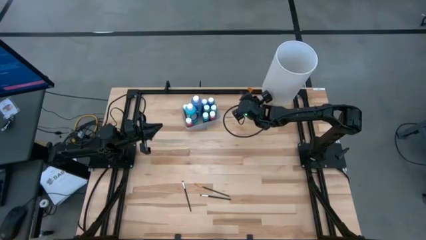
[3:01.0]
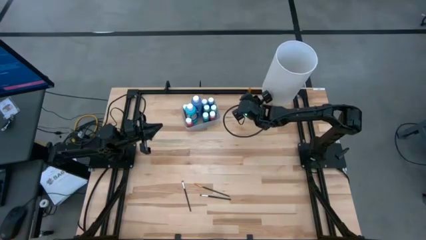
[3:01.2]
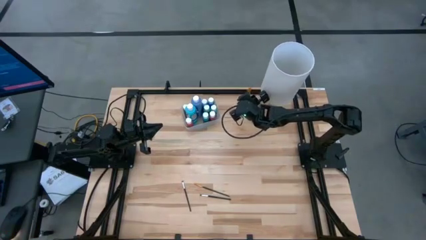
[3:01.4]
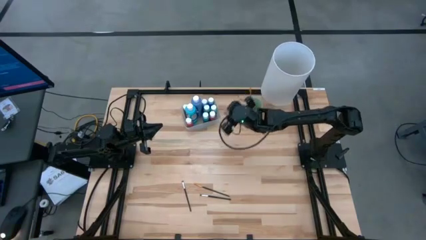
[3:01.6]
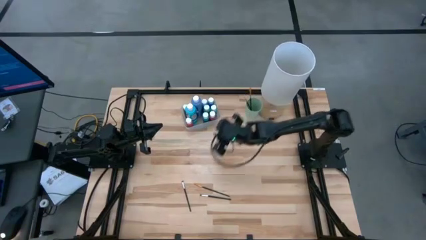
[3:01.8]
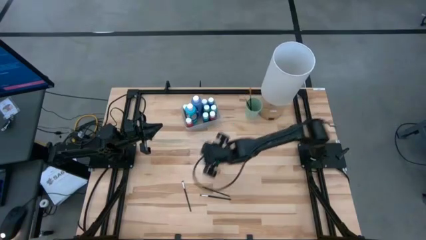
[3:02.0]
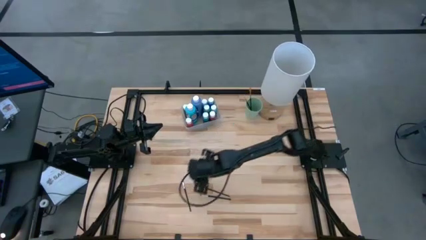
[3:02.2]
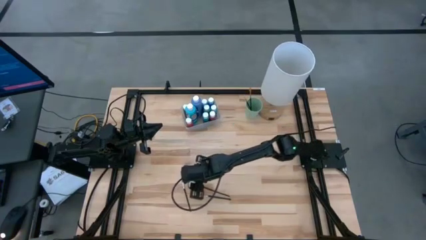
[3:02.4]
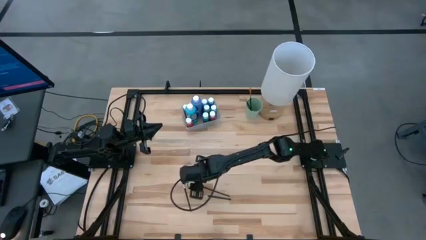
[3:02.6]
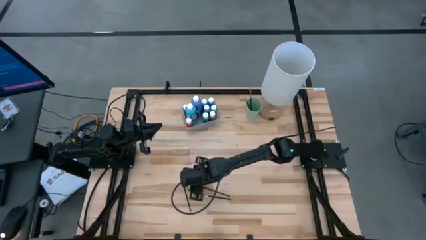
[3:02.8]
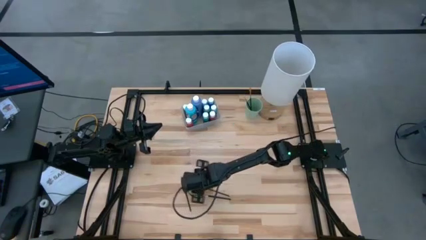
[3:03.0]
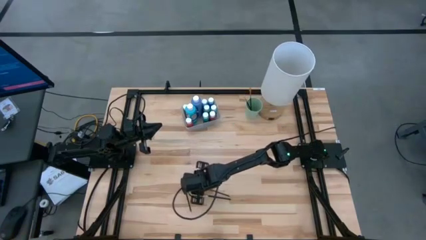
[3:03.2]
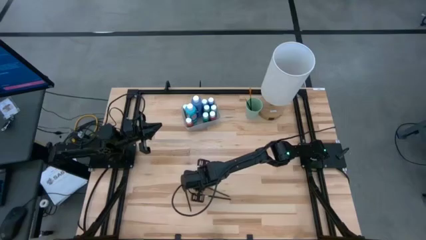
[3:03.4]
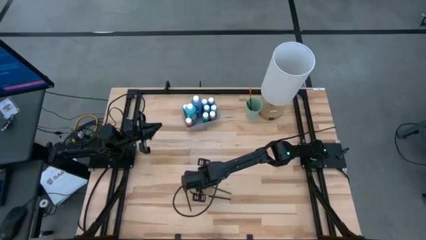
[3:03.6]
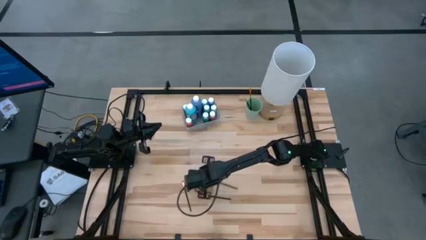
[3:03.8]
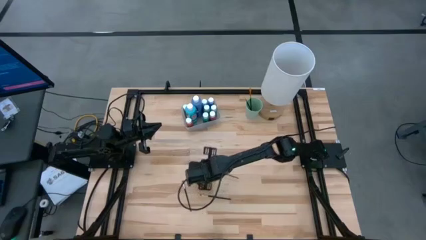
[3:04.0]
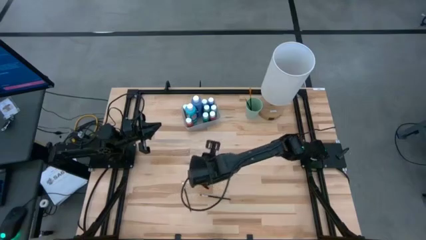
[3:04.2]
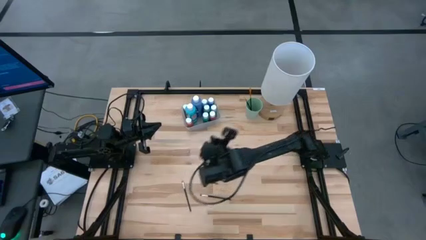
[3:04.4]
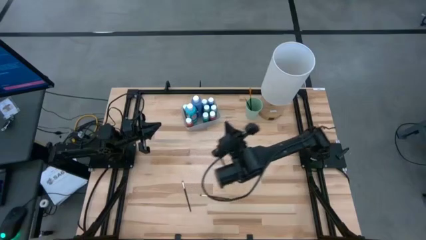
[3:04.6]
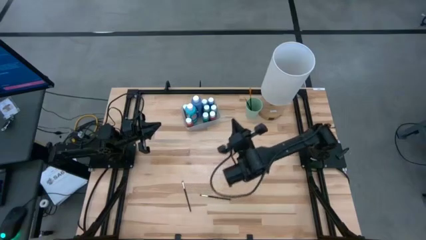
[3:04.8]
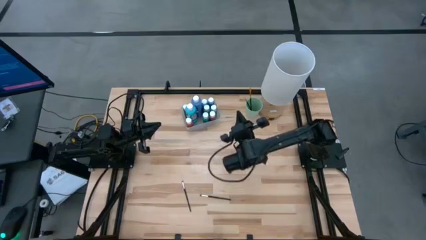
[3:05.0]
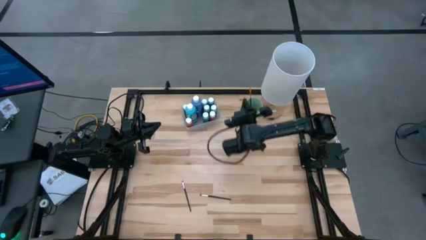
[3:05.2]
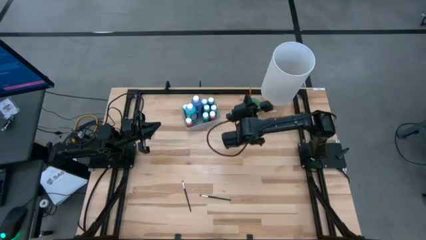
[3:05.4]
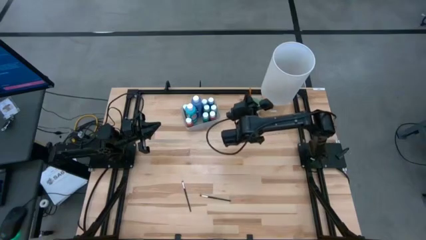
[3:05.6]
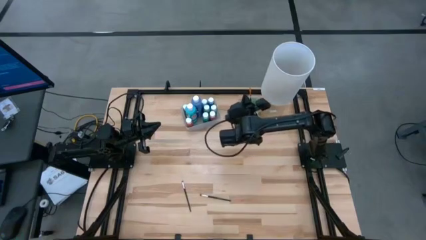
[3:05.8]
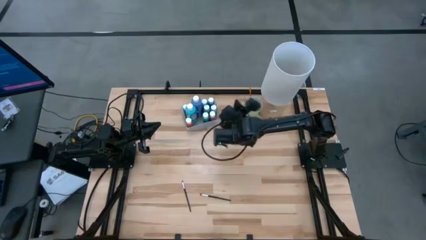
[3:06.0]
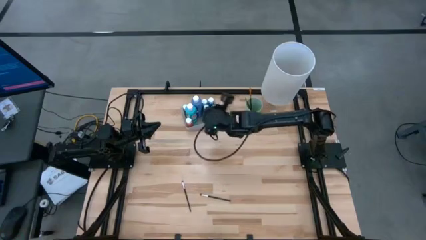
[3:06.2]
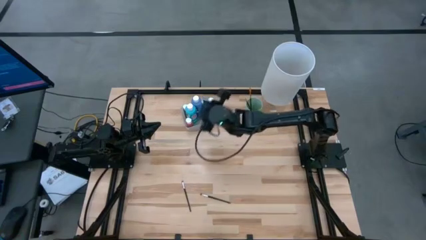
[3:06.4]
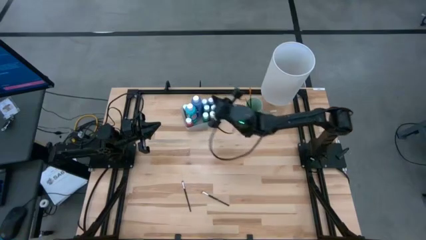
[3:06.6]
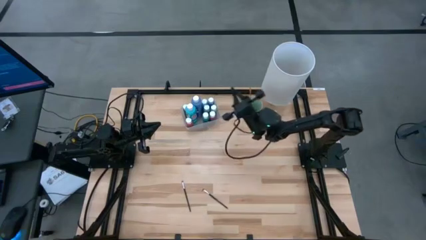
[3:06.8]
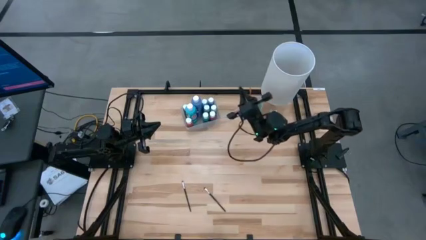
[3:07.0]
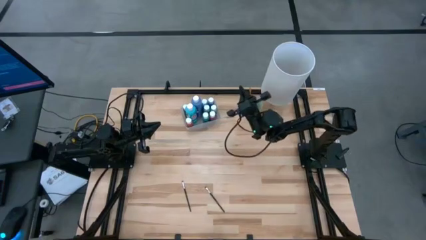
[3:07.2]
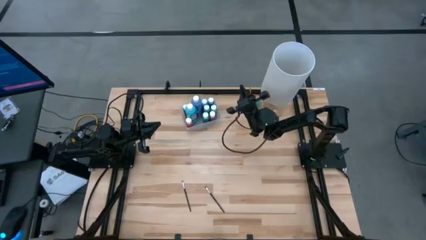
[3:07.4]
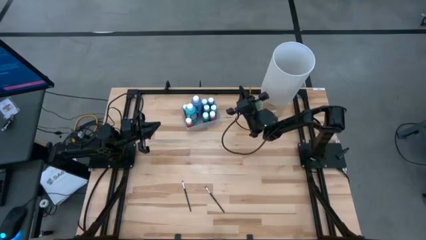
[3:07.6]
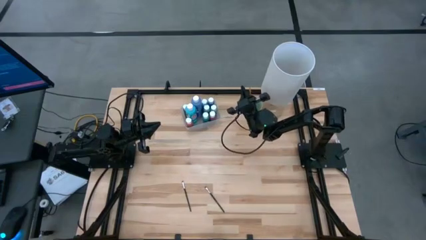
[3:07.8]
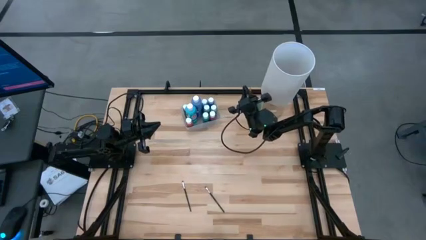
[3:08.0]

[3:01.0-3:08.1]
Task: Pick & Place Paint Supplies
Put the gold paintbrush into the green cup

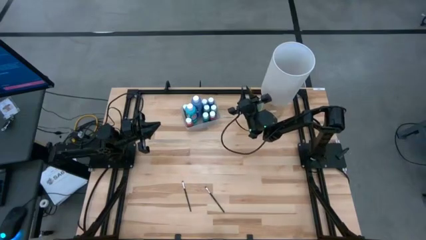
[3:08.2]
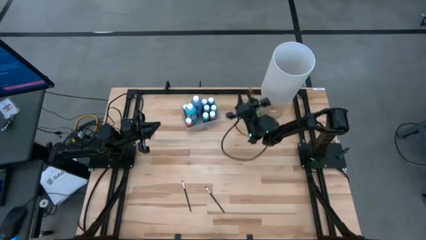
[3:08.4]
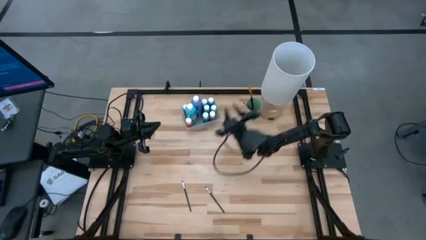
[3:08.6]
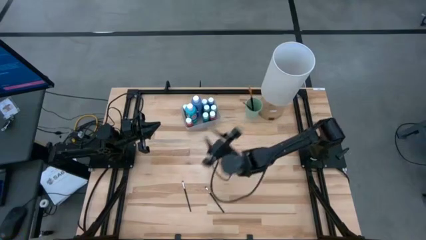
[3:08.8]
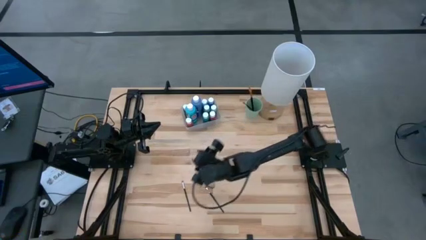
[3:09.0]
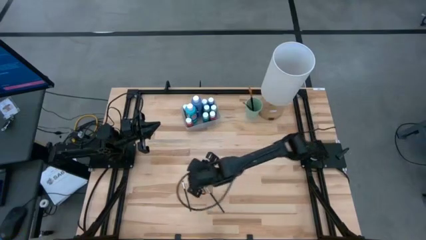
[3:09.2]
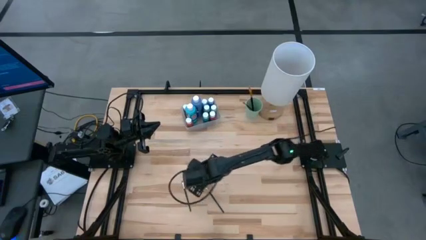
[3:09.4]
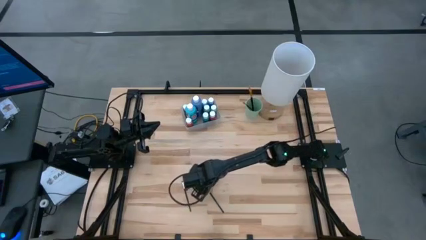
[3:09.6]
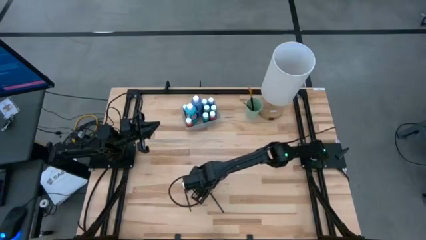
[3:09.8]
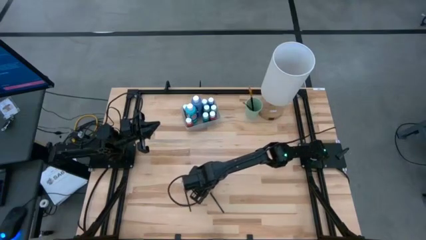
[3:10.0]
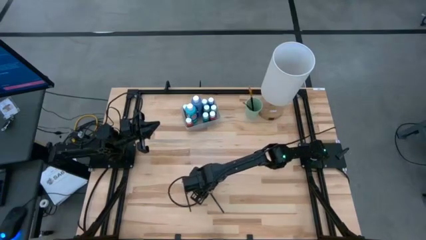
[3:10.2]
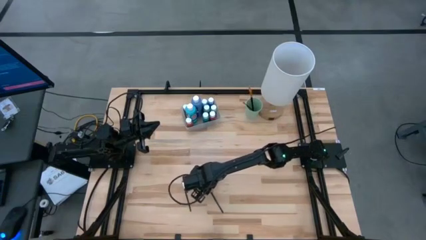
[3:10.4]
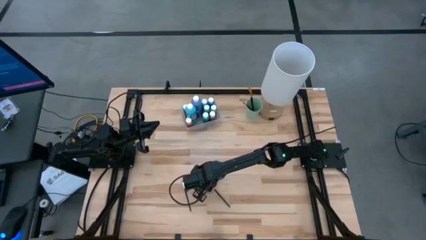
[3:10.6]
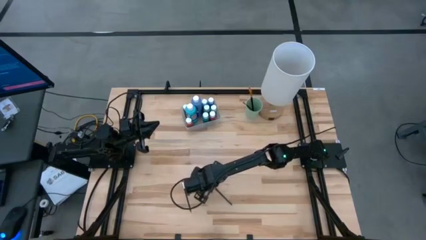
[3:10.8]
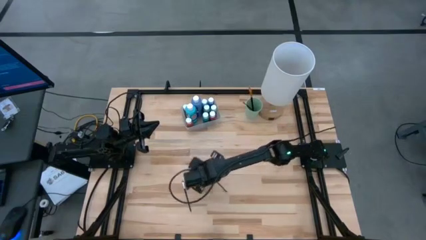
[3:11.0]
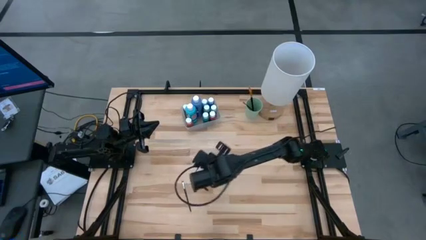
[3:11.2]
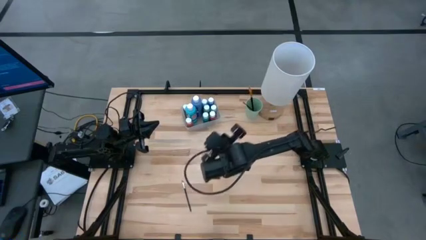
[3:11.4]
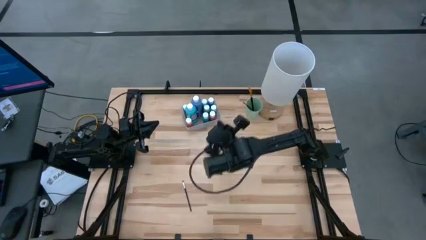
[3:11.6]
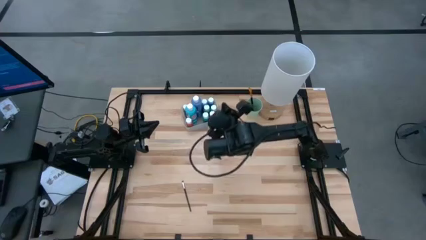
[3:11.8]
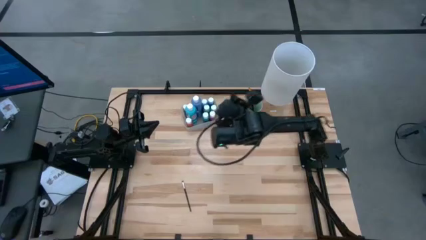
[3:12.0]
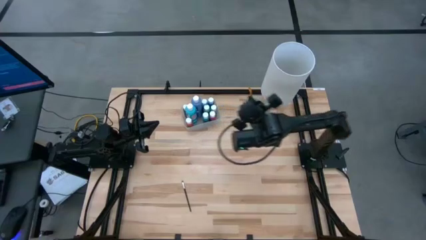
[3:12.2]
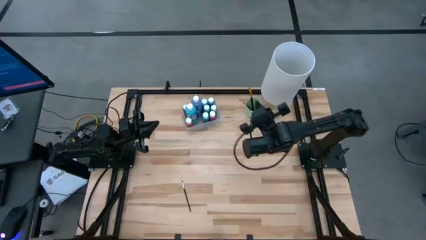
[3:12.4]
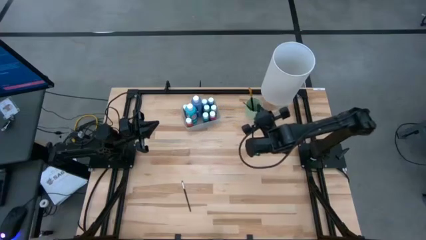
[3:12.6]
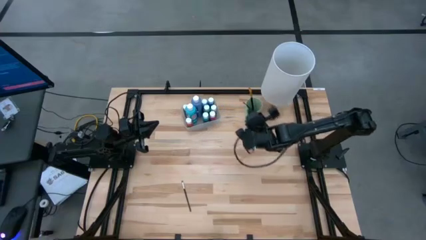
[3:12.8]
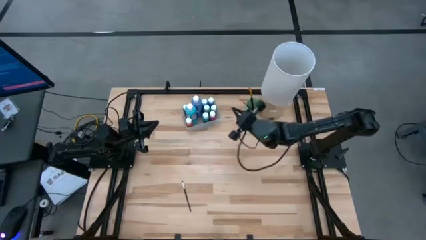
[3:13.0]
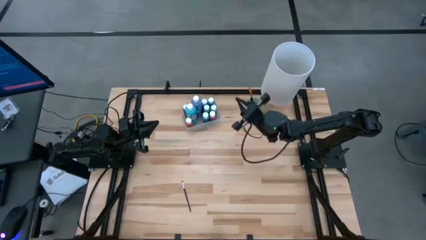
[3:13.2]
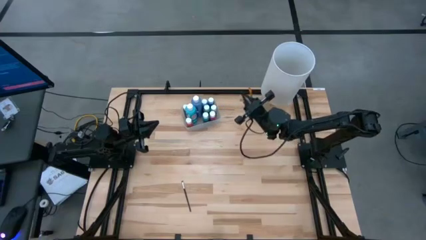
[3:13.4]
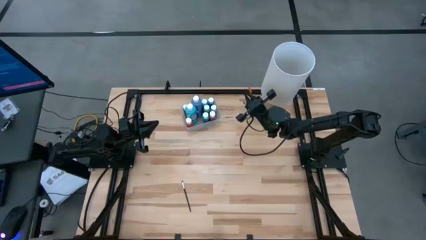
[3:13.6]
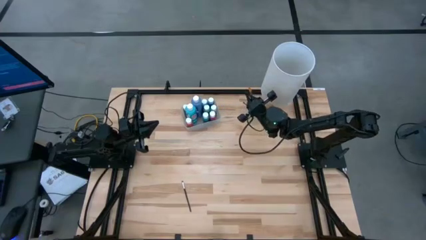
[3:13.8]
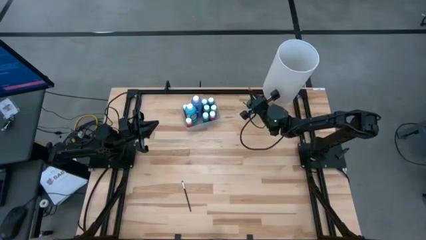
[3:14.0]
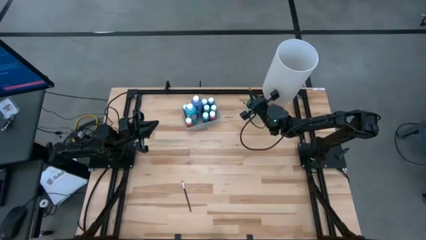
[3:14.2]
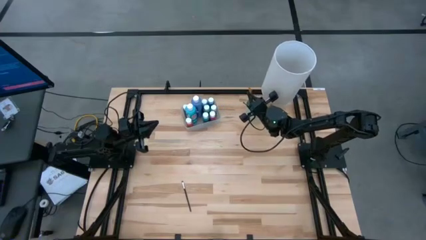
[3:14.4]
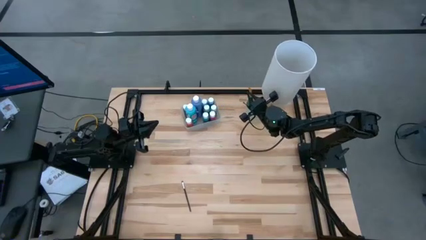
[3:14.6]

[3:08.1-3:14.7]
Put the silver paintbrush into the green cup
